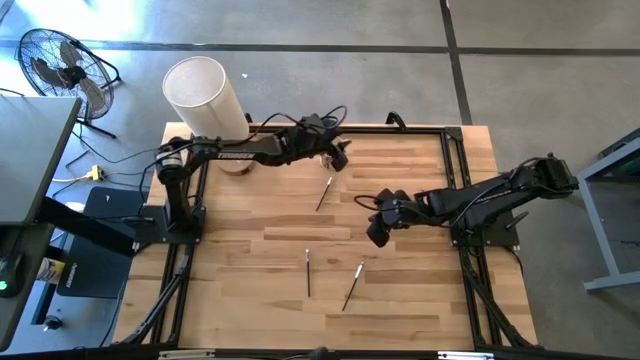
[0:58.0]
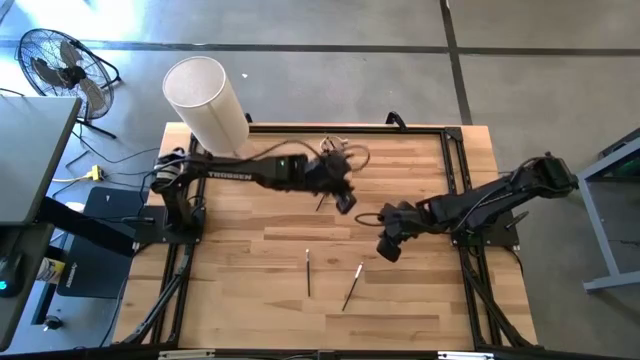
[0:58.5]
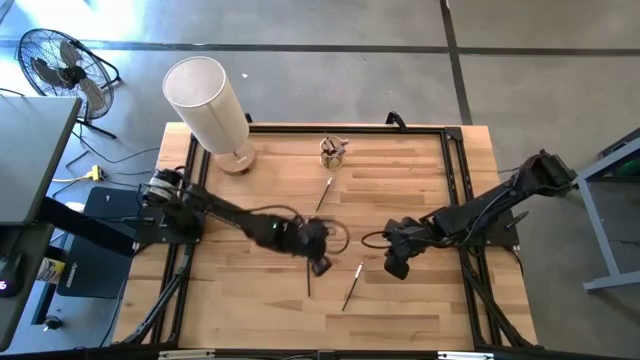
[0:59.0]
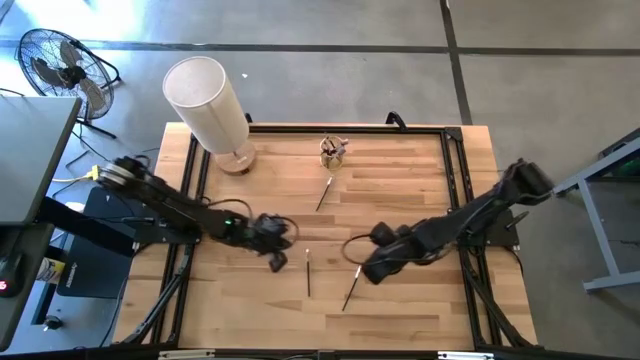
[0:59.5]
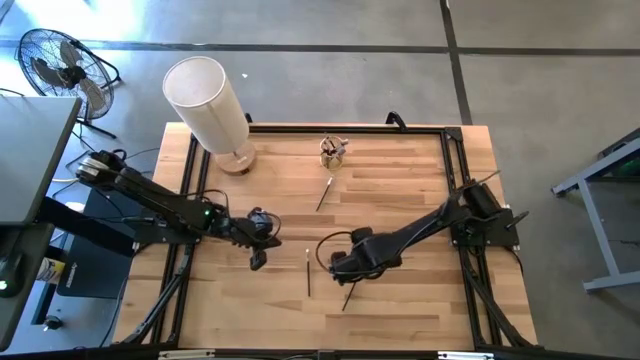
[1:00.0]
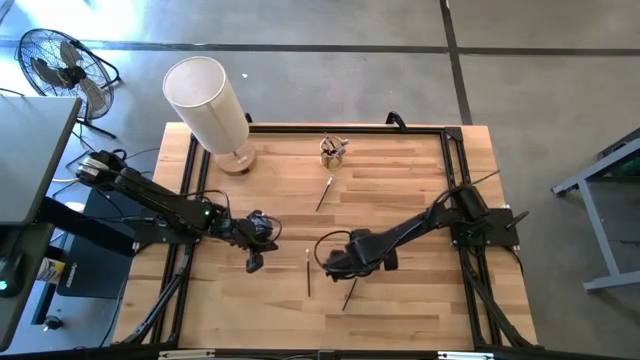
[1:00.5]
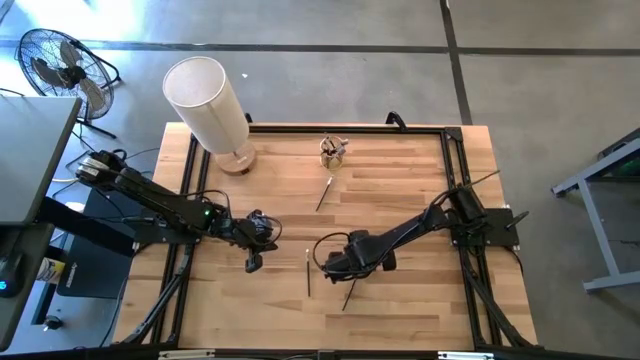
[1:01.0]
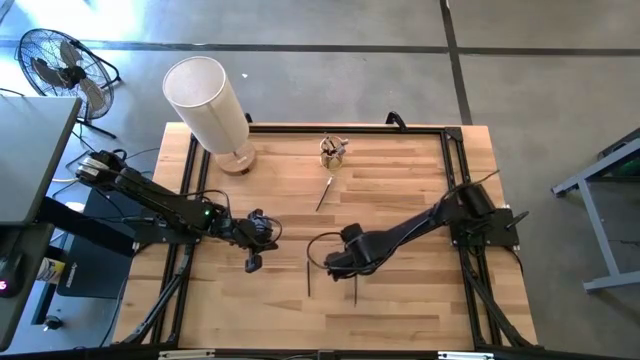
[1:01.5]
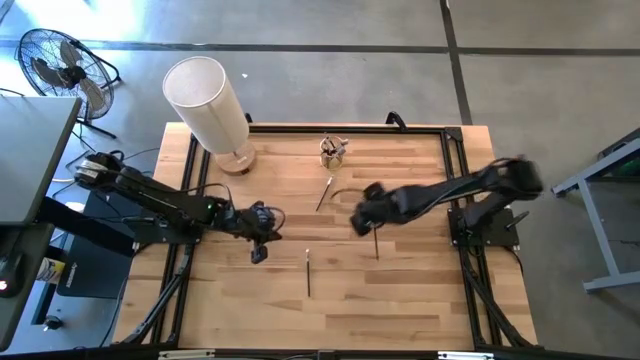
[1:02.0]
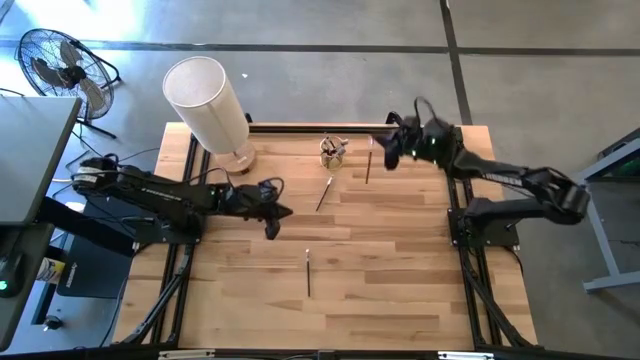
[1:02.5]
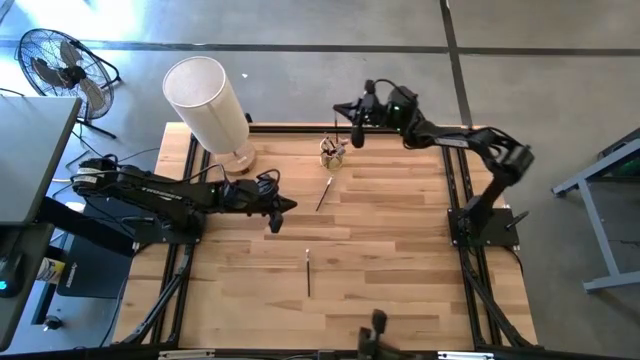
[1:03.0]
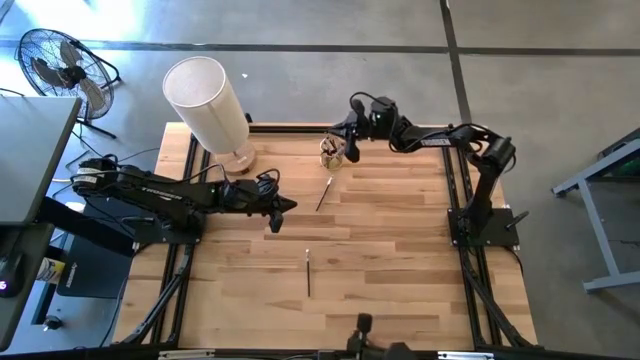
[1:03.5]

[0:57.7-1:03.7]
Task: Sort items
Put the angle shadow brush into the glass

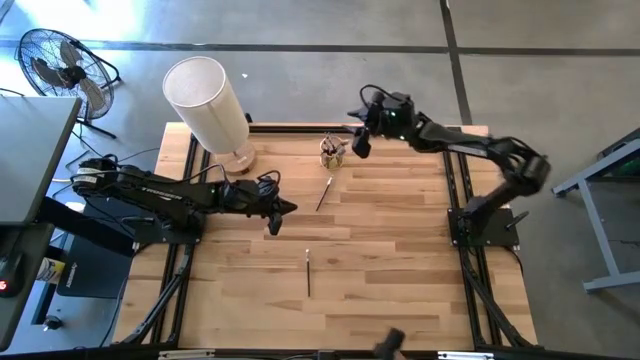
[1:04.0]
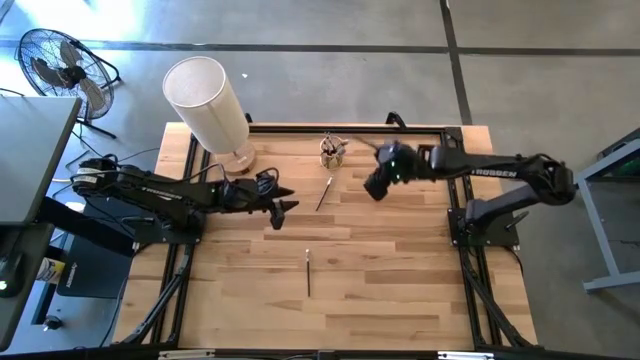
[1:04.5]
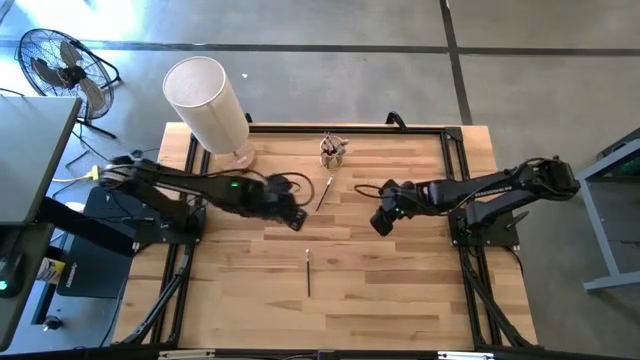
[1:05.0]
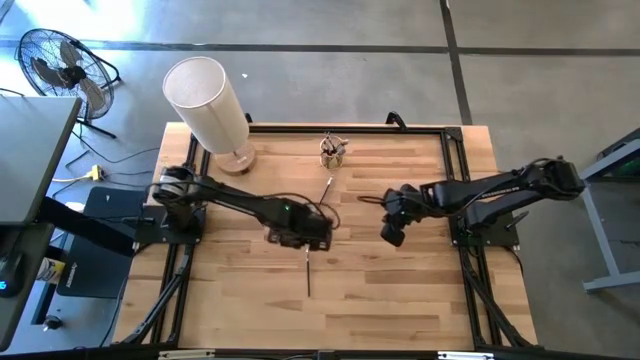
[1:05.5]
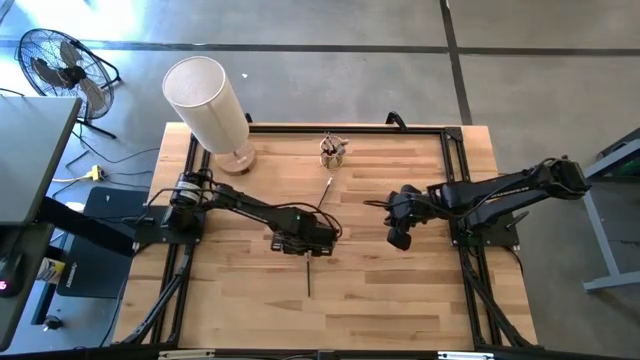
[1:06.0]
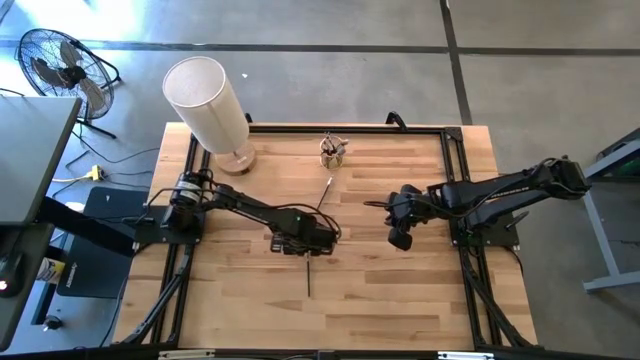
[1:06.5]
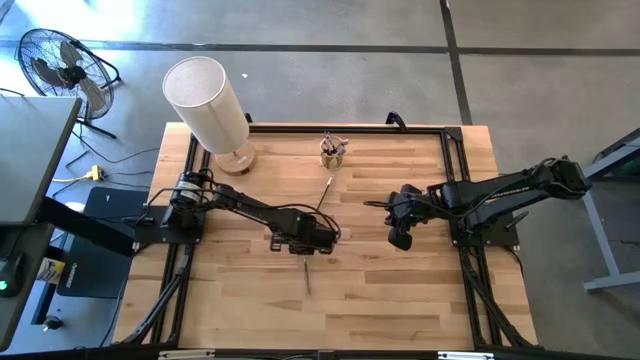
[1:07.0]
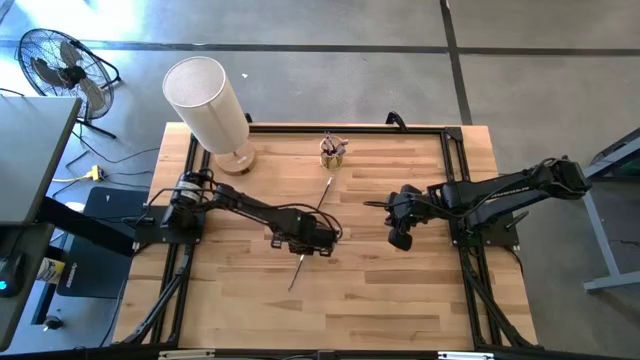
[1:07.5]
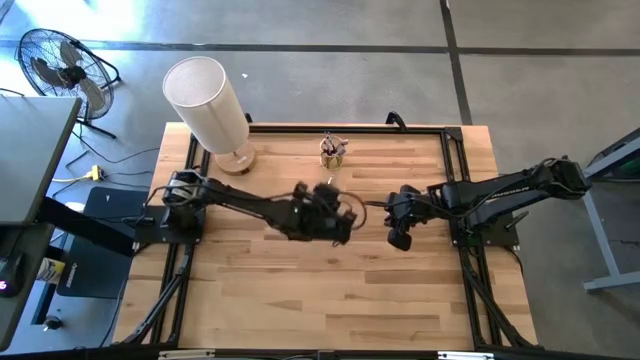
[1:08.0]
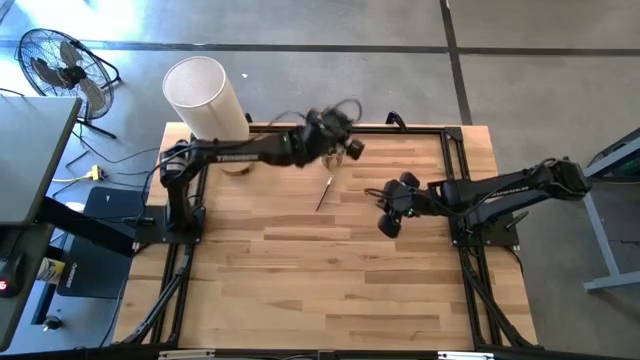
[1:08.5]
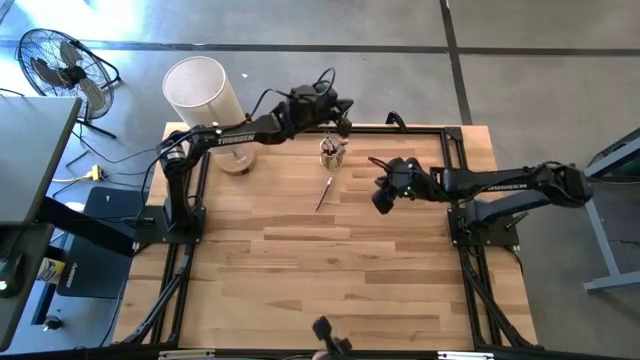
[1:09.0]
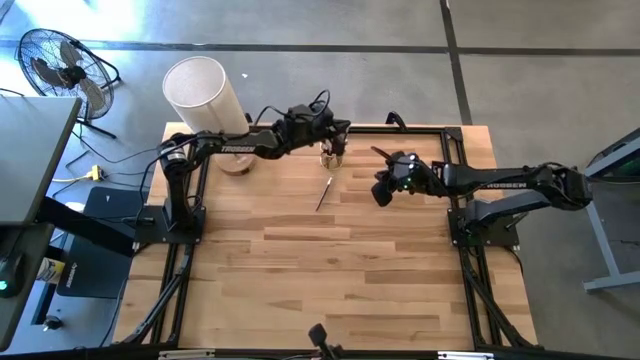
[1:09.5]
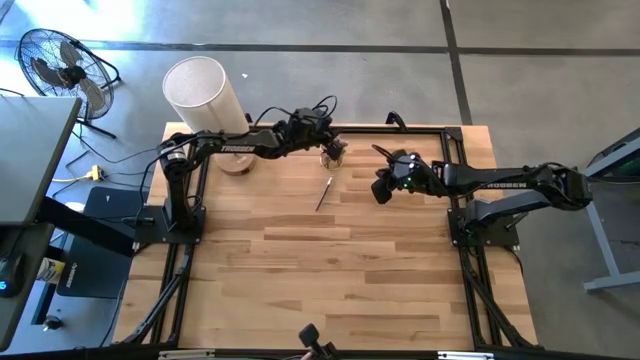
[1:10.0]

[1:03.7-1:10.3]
Put the angle shadow brush into the glass

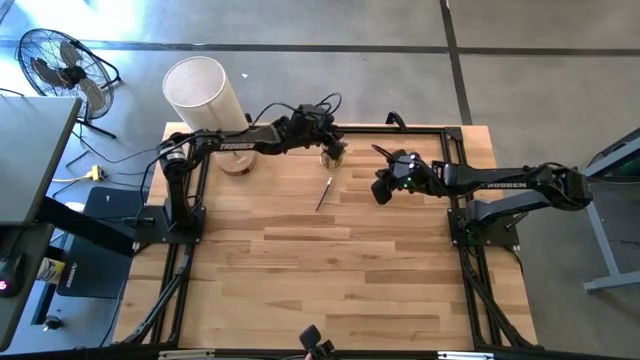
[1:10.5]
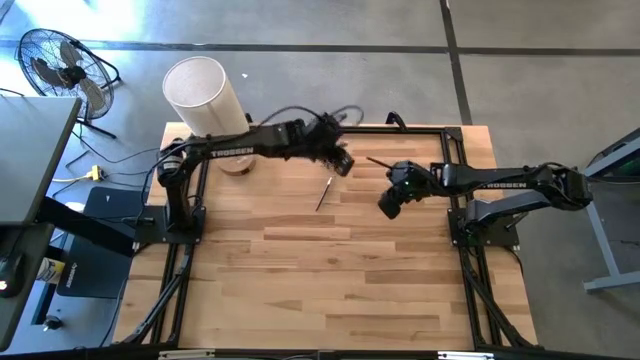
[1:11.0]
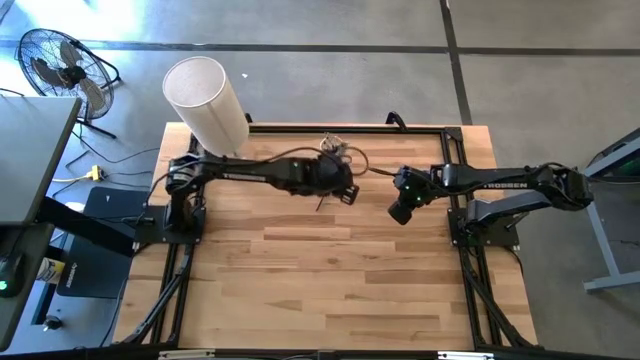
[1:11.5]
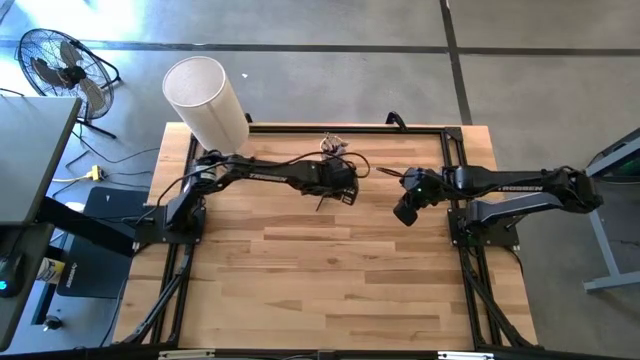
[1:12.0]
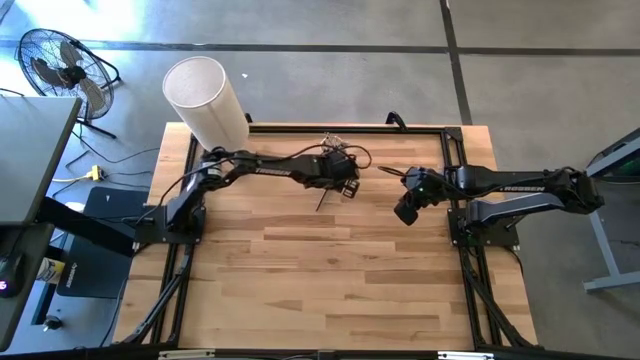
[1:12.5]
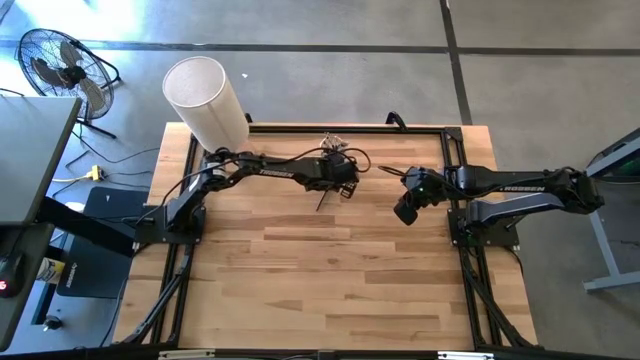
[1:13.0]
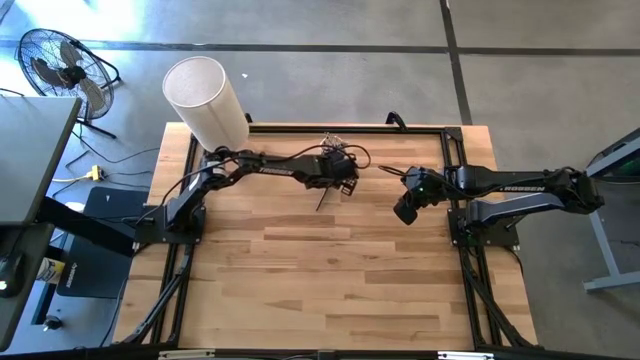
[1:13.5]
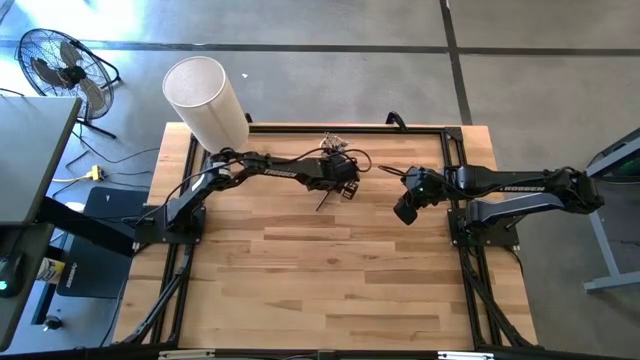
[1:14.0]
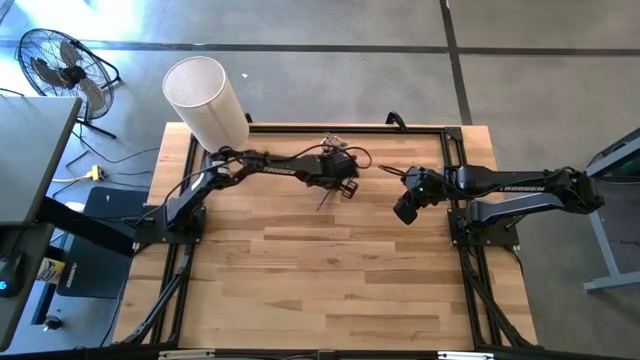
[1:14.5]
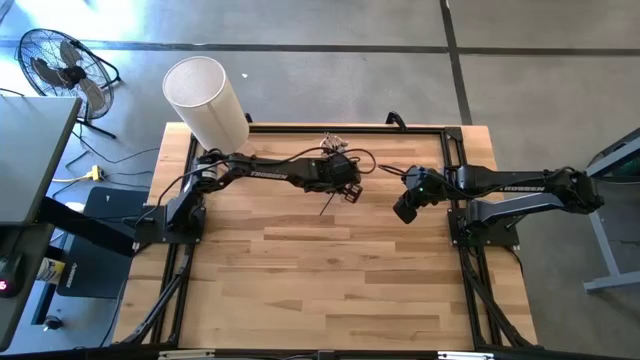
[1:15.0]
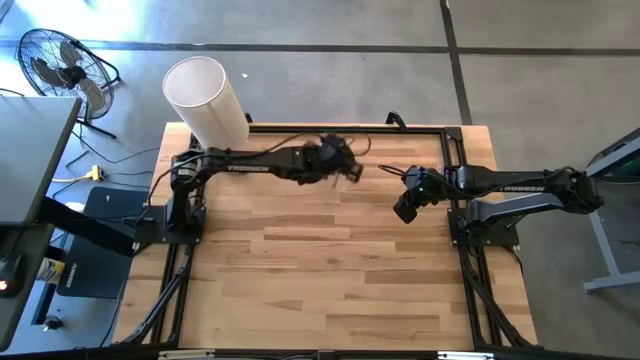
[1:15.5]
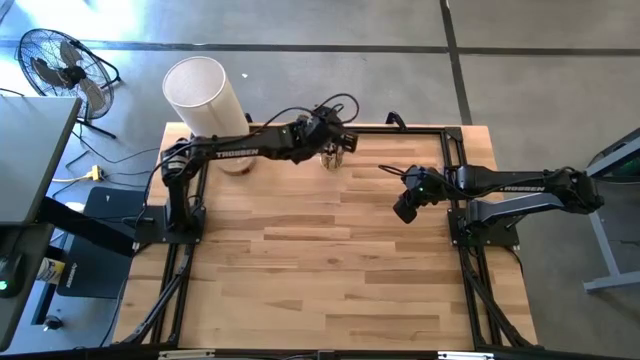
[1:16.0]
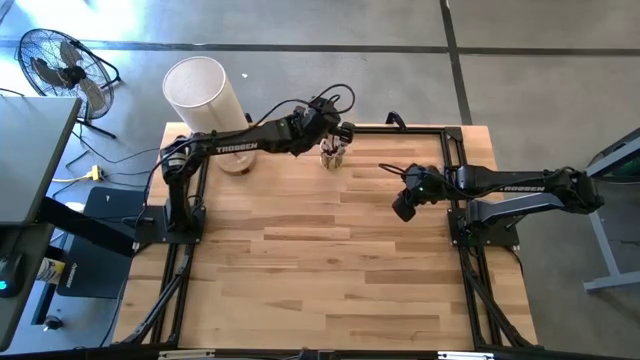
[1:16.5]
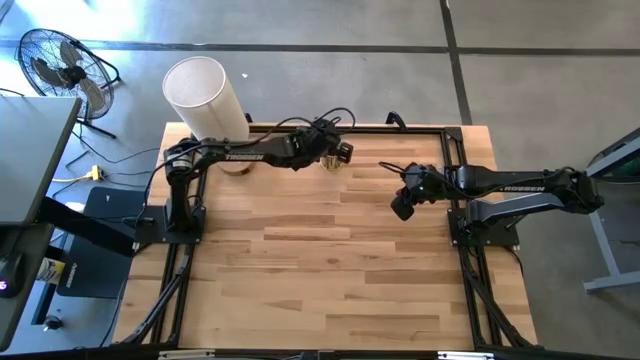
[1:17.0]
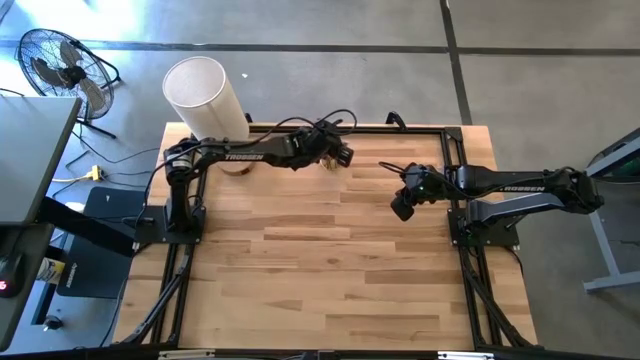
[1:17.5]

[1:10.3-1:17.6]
Put the angle shadow brush into the glass

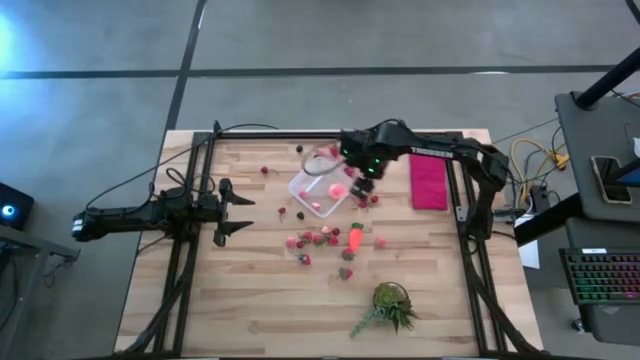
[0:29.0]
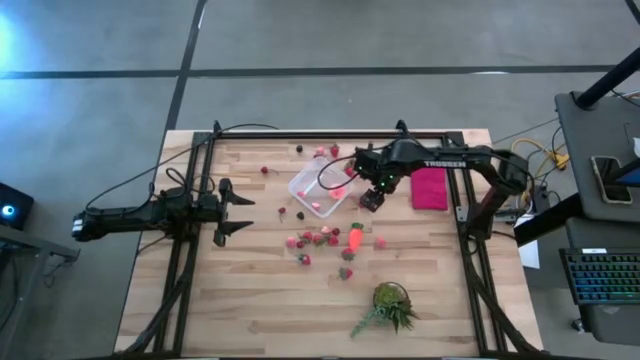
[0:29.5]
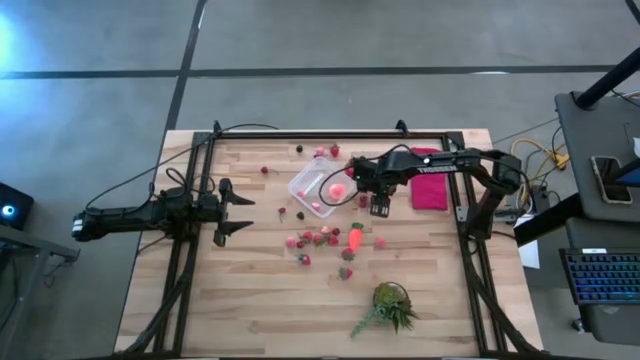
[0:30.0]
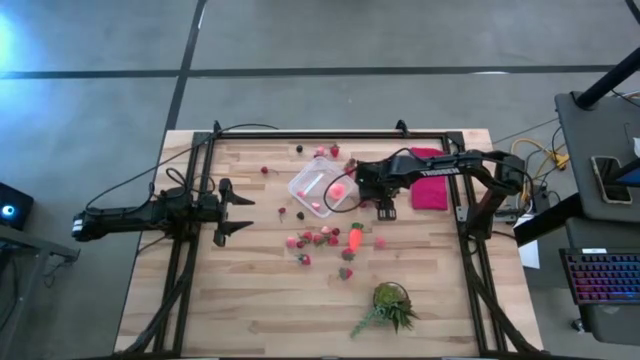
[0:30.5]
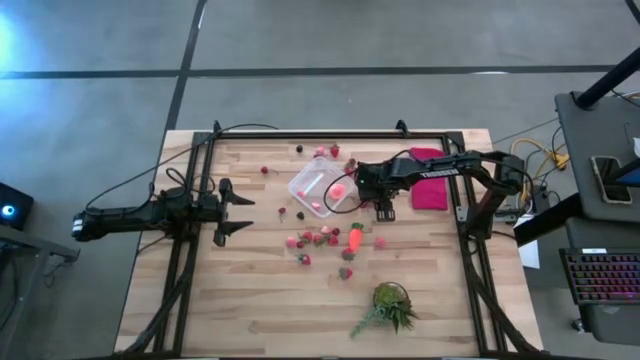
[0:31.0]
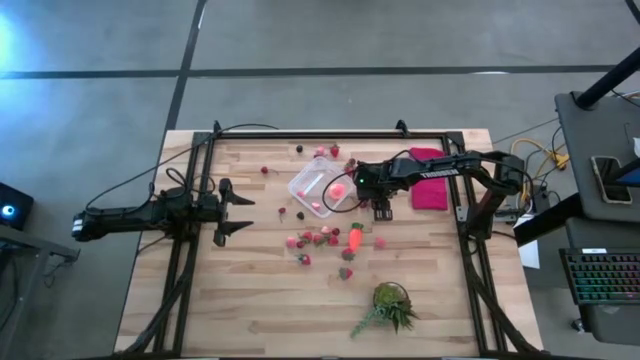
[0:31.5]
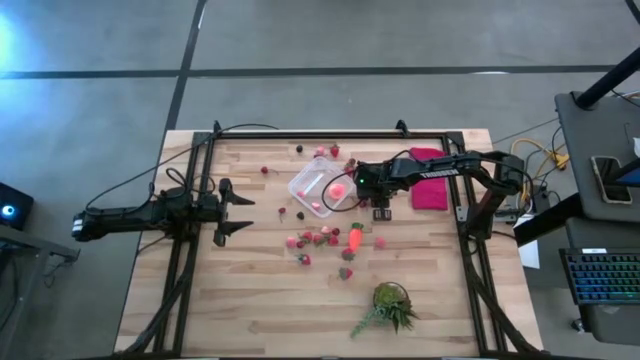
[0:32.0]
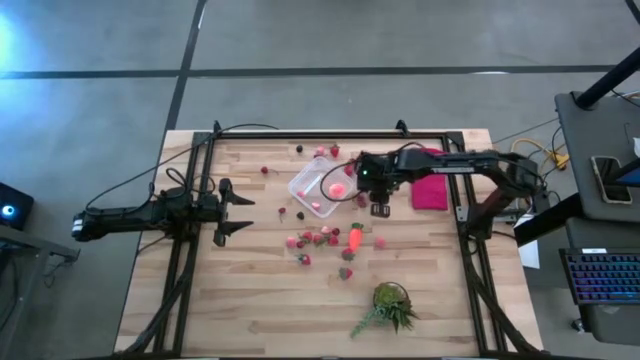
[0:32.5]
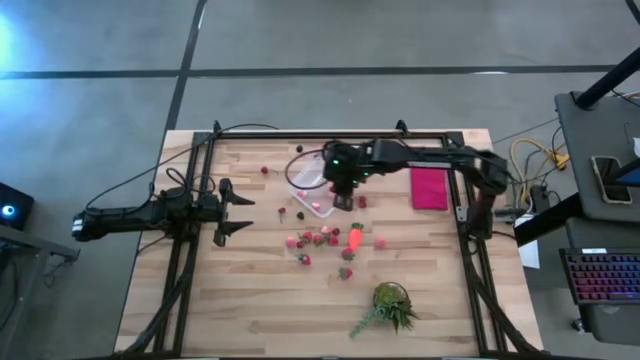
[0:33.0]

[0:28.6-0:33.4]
Task: Pick and placing Produce into tupperware
Put the red cherry into the transparent container
